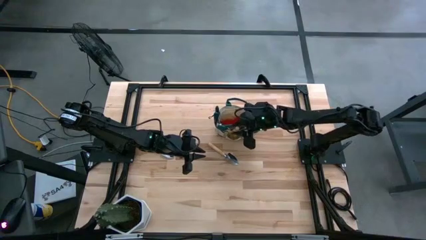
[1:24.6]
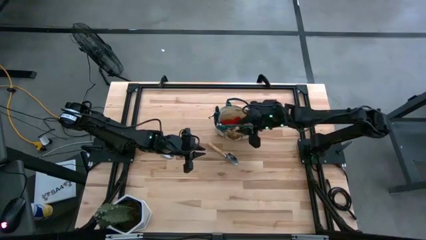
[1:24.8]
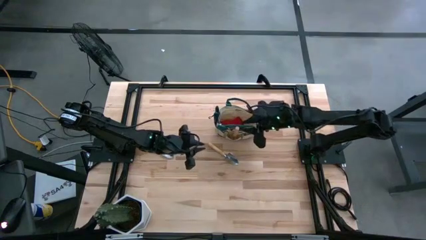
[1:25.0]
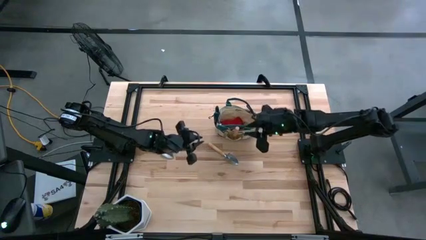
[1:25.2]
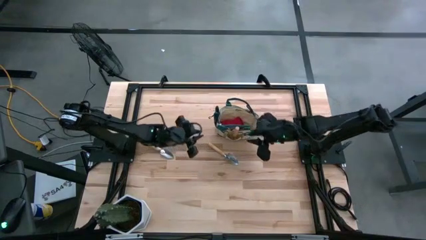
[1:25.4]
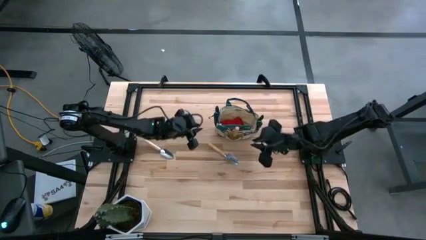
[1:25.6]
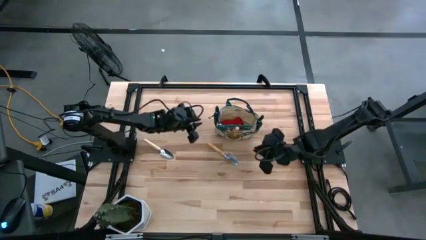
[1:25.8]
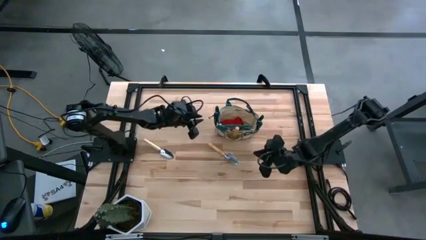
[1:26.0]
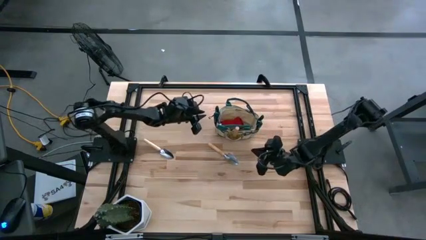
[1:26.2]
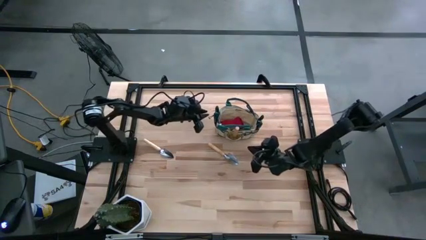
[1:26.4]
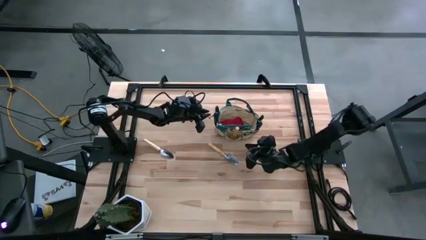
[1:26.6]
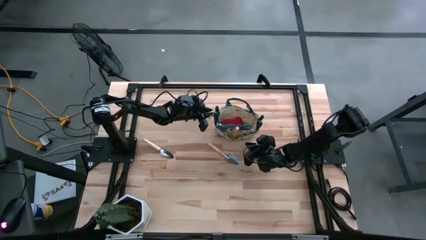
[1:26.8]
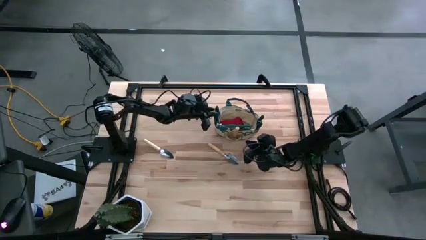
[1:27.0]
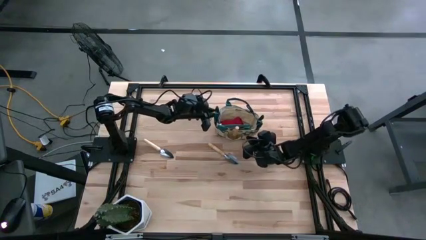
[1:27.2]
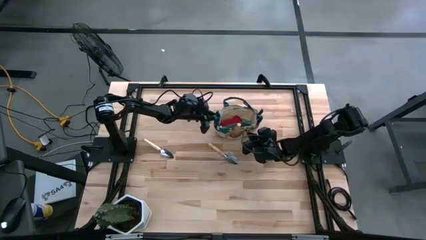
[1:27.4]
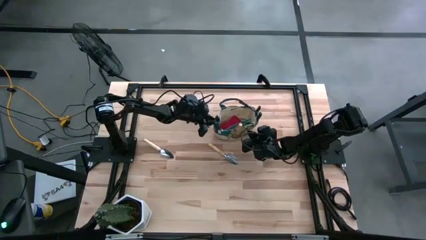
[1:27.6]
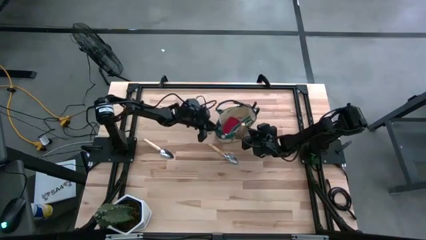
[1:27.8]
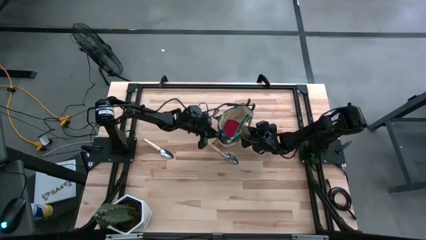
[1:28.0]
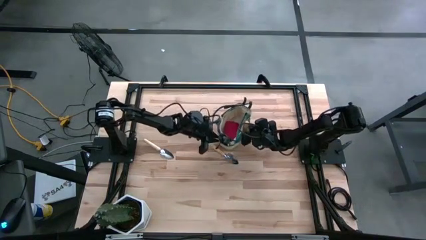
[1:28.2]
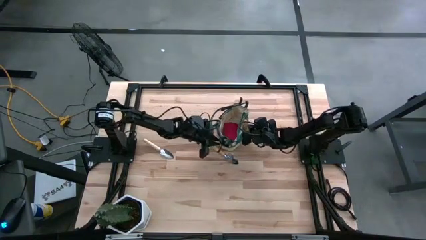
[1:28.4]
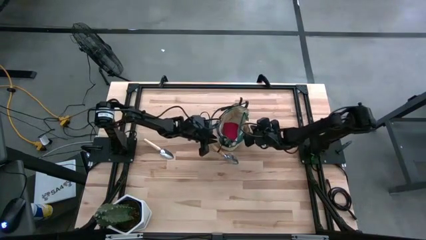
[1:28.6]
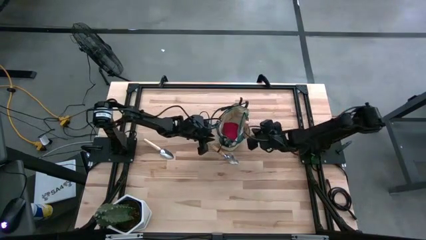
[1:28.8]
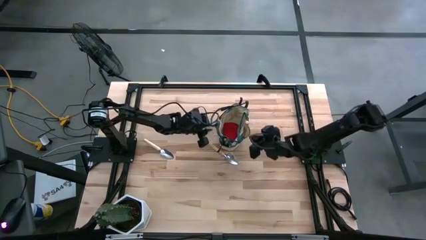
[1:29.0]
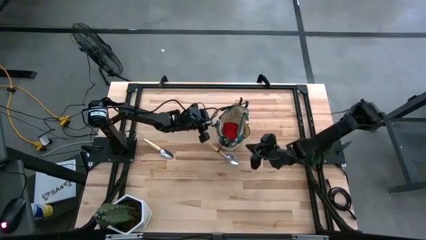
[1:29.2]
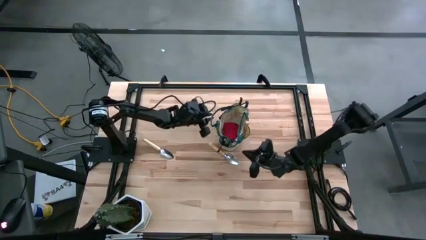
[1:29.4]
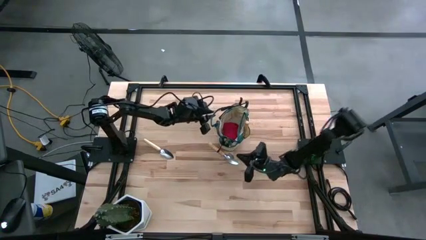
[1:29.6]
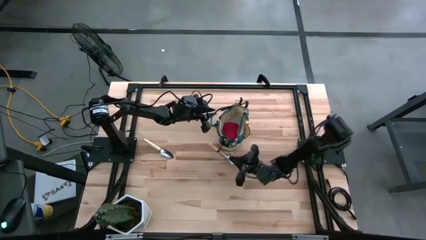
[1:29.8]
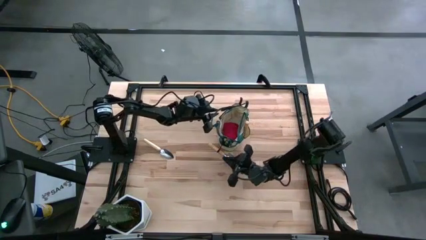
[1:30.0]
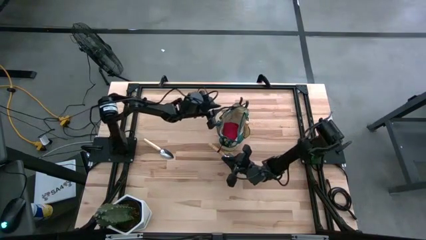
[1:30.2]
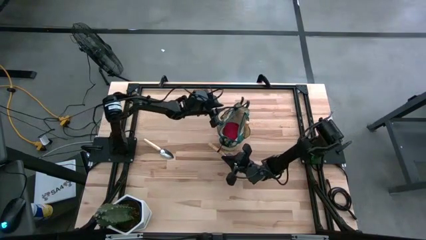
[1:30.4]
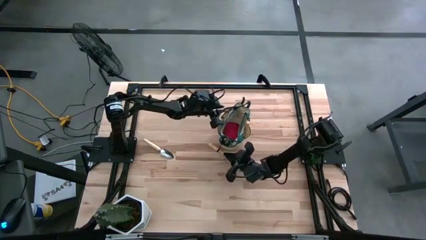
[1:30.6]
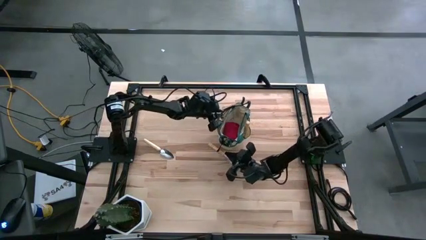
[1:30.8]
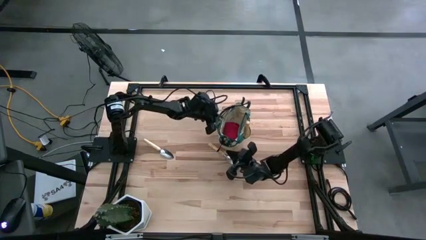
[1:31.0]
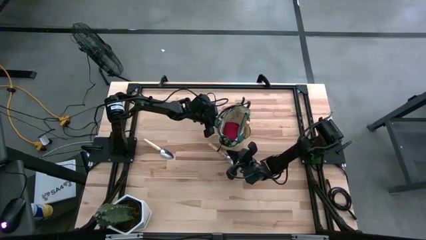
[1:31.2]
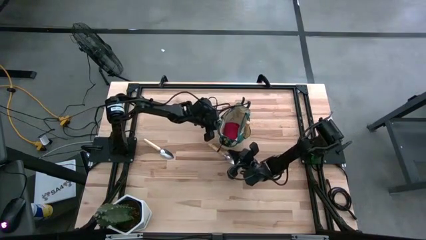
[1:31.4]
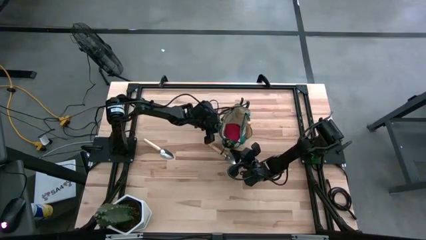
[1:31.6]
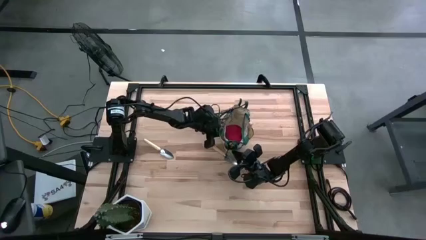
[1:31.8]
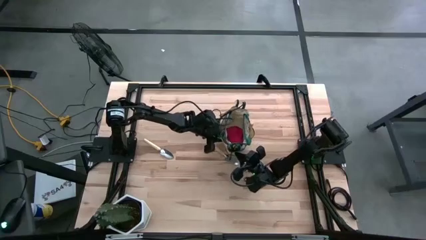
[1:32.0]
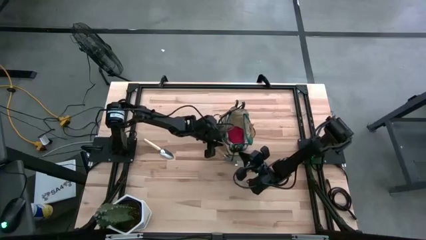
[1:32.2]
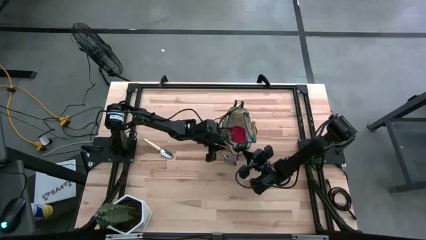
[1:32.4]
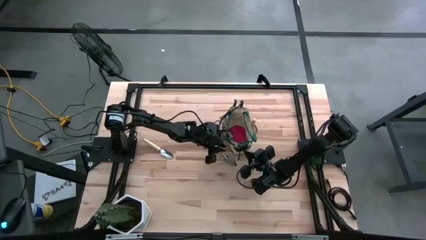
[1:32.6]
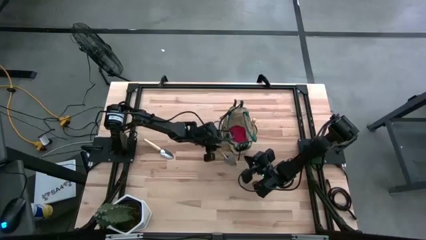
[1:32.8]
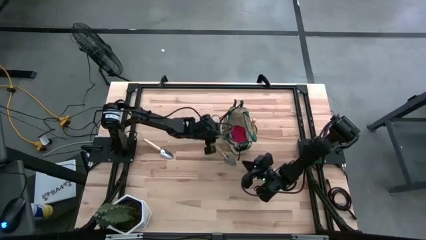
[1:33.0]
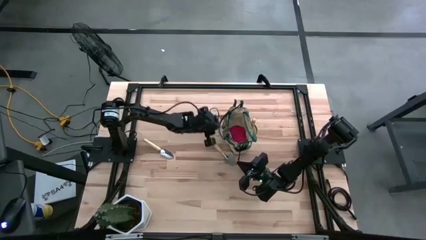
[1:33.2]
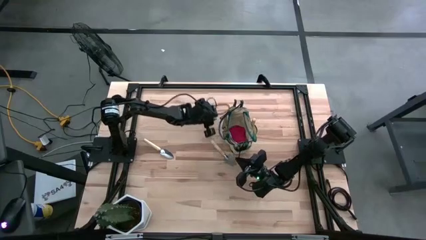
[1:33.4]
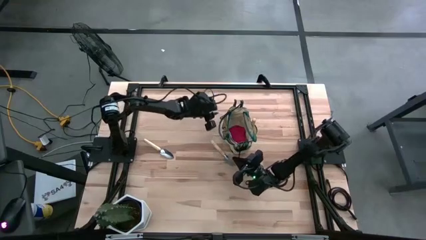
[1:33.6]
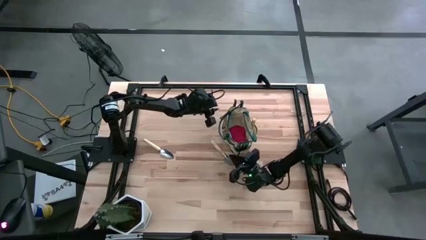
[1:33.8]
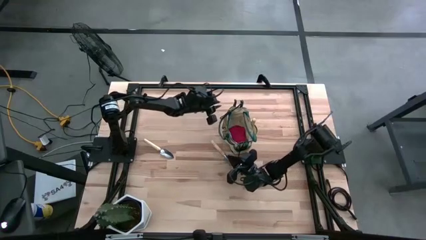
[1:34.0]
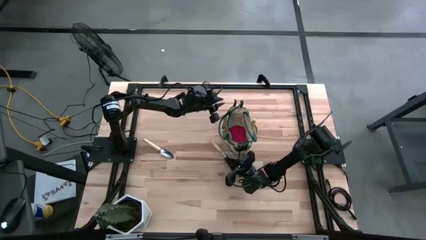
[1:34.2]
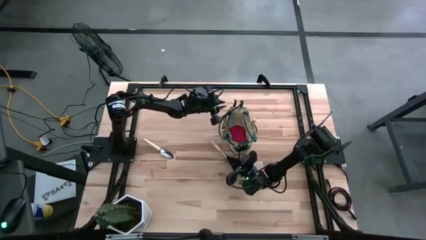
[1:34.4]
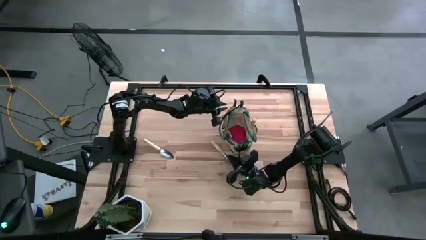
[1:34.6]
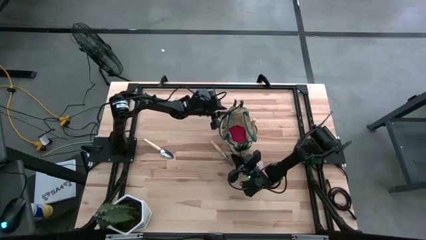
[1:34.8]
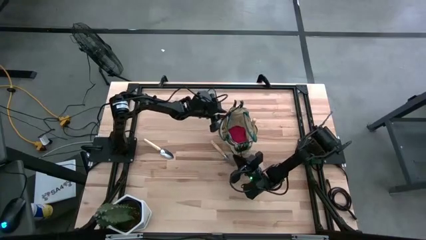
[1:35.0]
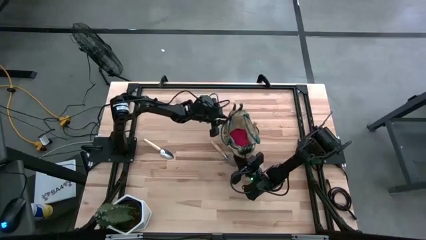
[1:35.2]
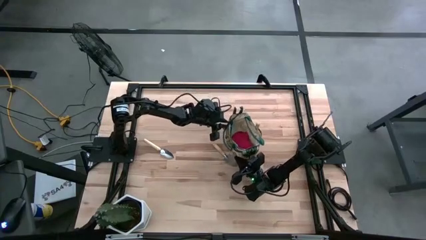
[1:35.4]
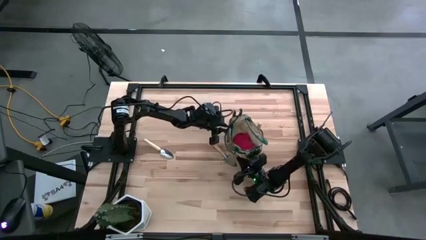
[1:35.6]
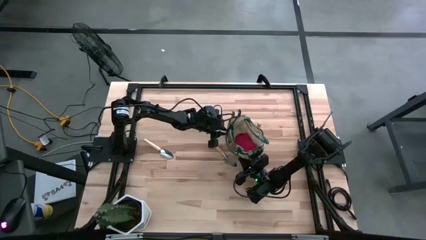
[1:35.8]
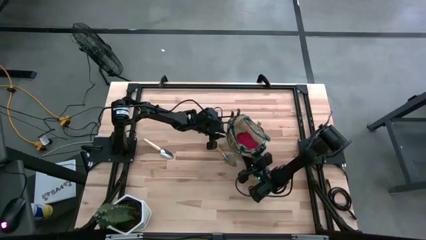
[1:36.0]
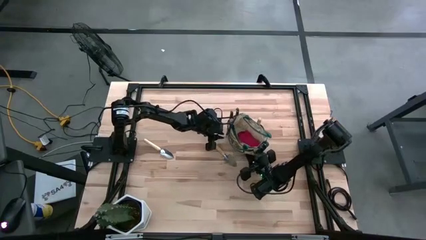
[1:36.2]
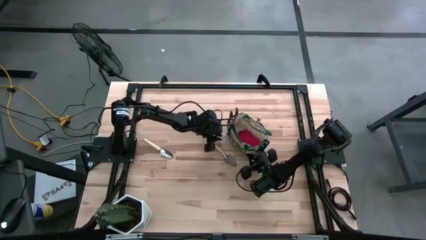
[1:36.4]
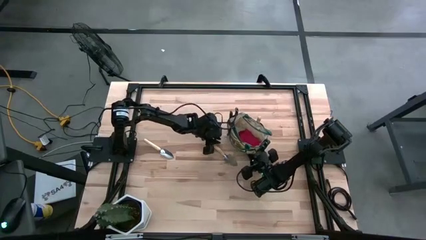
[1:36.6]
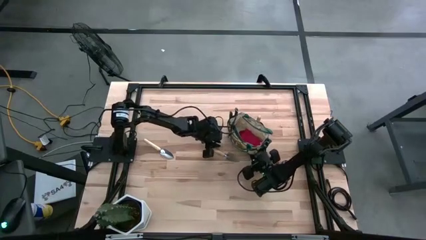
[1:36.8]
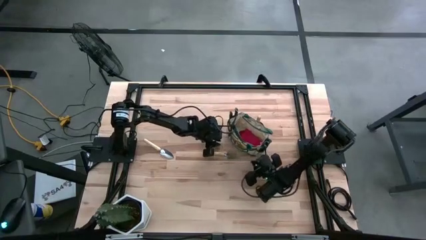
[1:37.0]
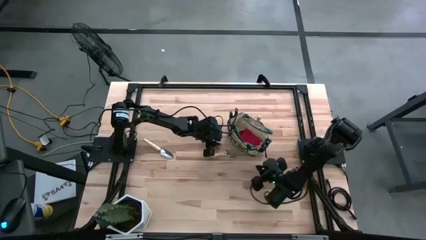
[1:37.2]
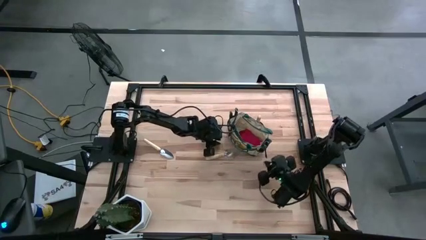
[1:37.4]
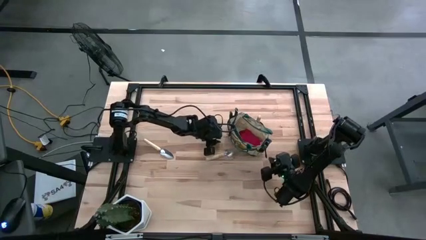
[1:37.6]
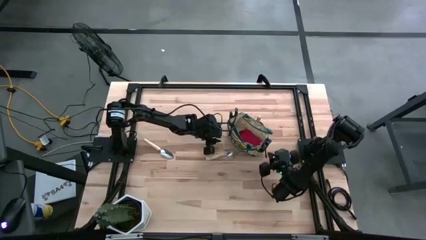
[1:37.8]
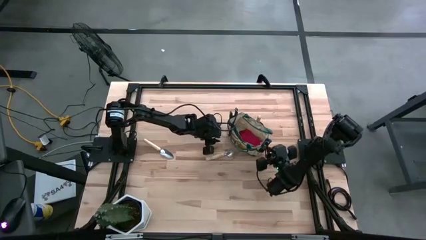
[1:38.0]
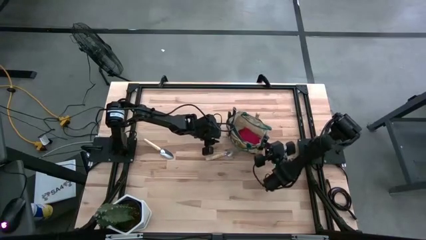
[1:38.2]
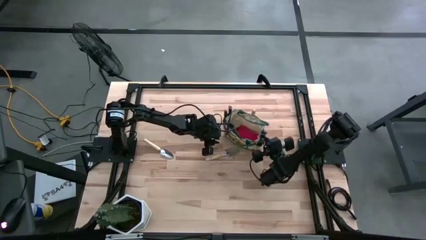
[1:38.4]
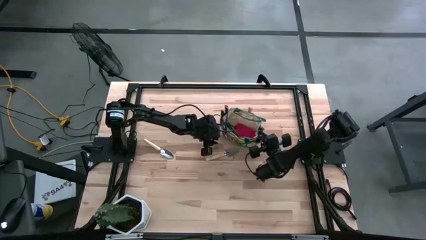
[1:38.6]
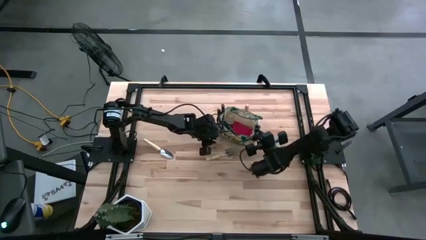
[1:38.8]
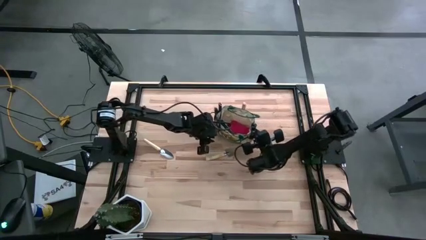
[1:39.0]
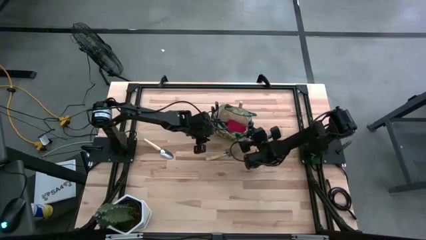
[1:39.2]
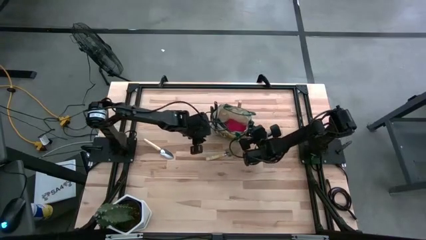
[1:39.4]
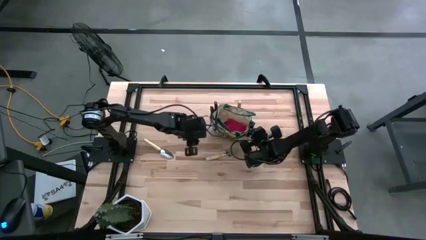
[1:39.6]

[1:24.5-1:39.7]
Task: Pick & Place Garden tools in Gardening bag
Adjust the gardening bag

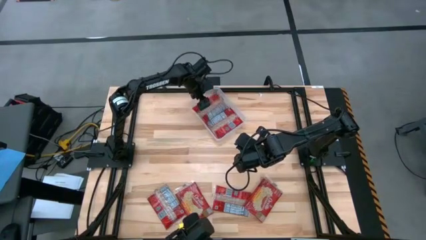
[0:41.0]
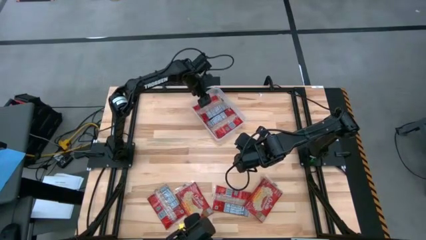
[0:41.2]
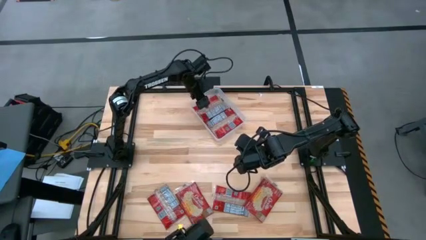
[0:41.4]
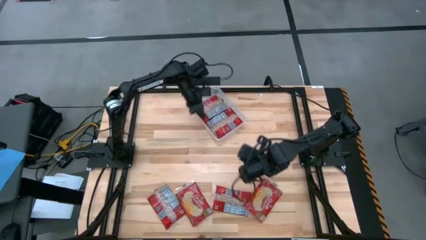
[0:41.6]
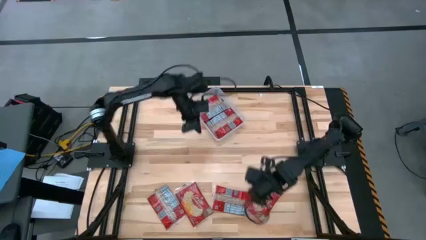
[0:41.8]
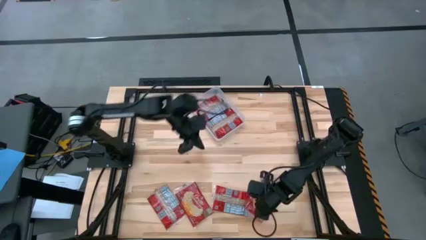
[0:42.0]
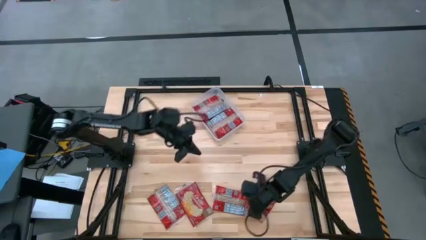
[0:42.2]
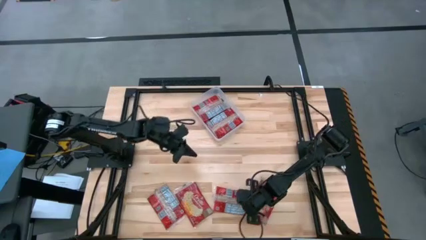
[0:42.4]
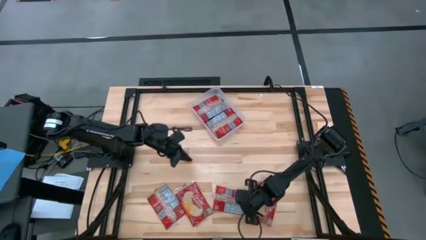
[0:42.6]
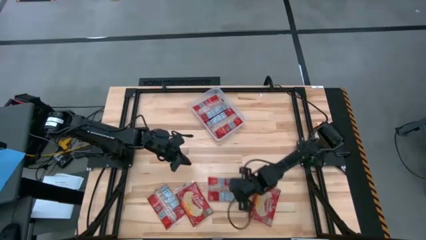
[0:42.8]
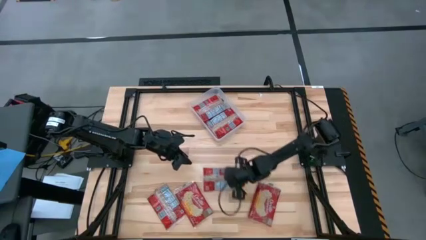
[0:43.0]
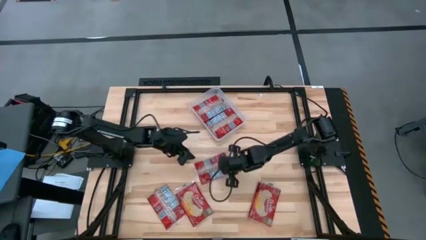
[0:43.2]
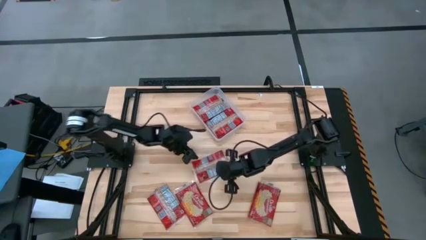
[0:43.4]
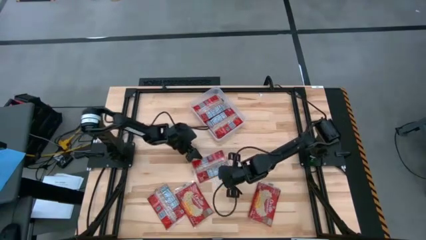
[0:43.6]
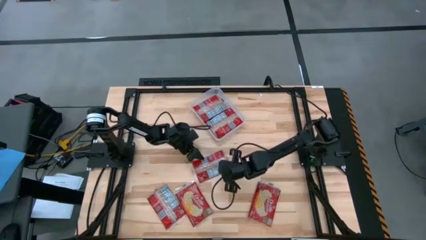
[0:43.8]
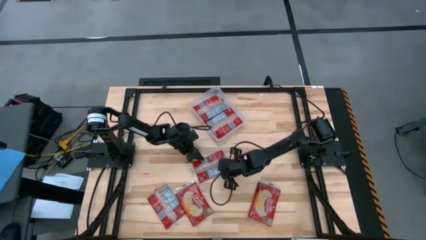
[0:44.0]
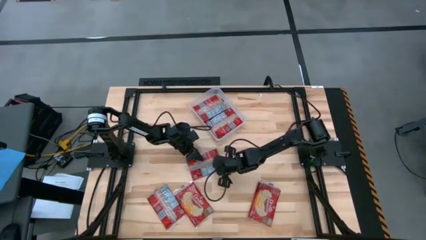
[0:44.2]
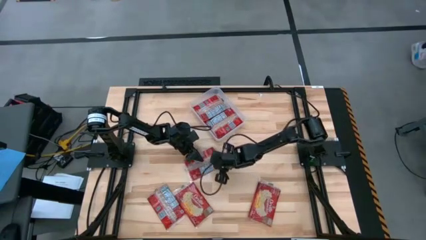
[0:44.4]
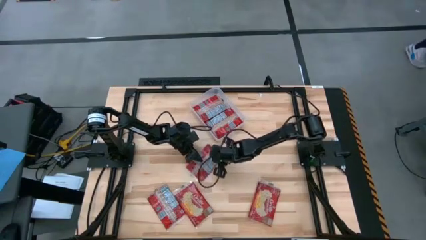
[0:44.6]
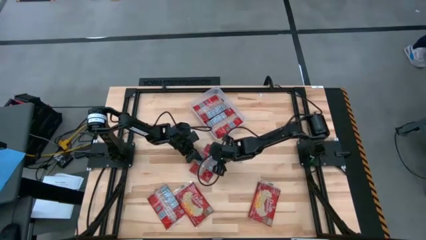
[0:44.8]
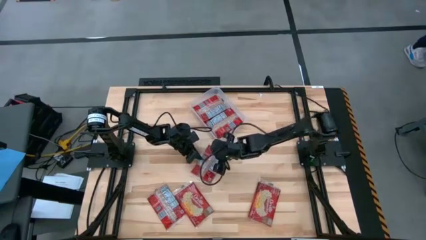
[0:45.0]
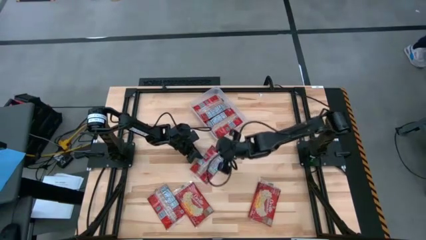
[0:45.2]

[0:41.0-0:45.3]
Task: Sort popcorn bags into baskets
Put the red popcorn bag into the white bin
